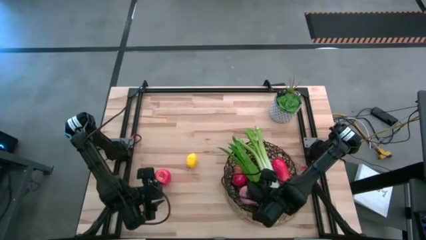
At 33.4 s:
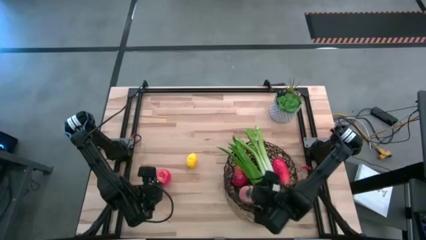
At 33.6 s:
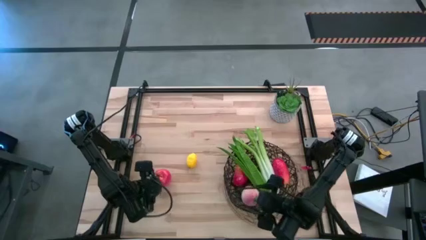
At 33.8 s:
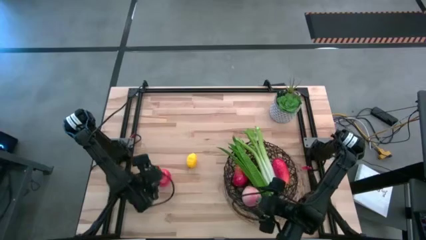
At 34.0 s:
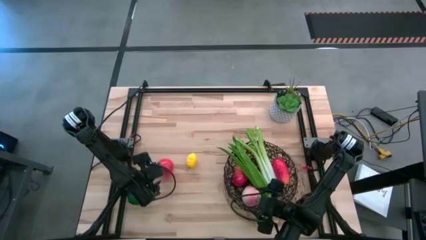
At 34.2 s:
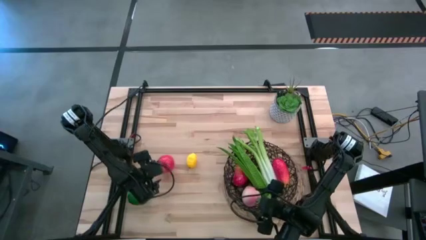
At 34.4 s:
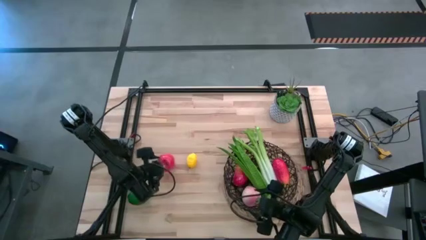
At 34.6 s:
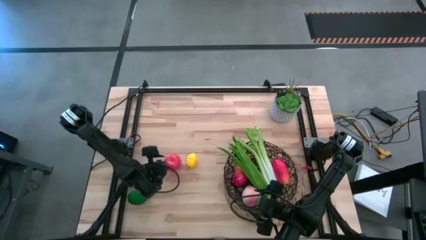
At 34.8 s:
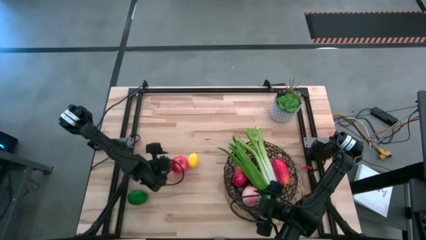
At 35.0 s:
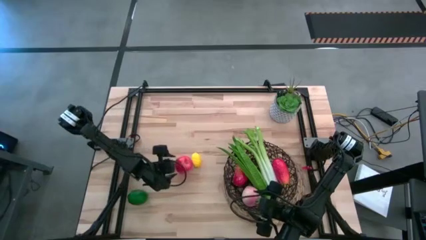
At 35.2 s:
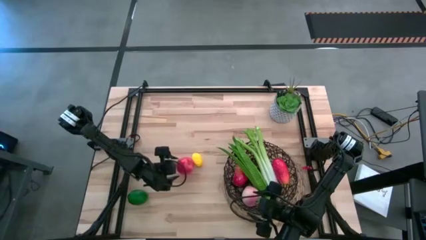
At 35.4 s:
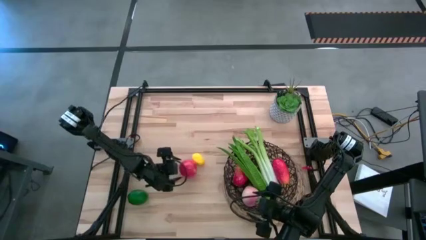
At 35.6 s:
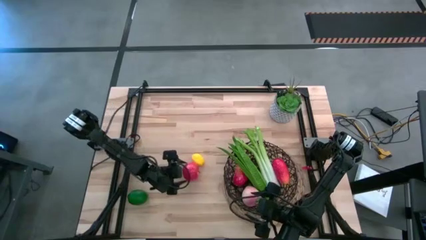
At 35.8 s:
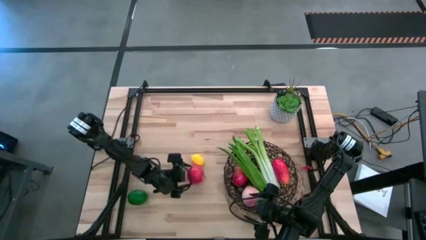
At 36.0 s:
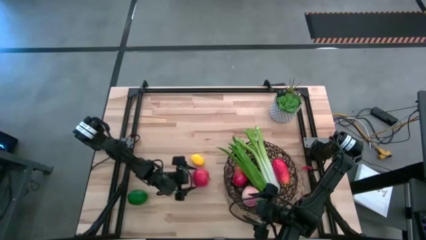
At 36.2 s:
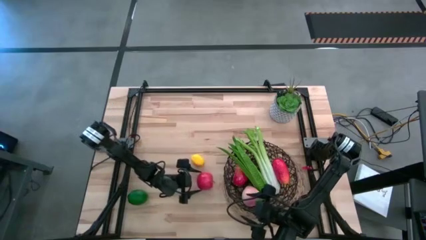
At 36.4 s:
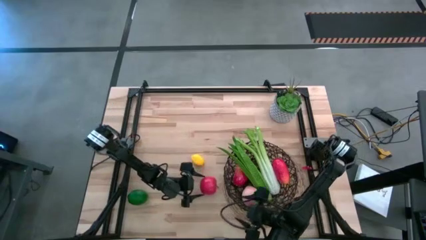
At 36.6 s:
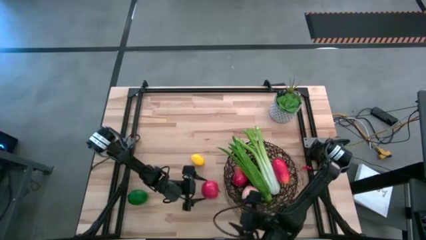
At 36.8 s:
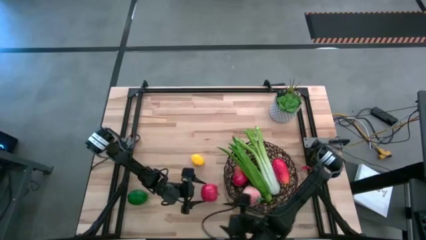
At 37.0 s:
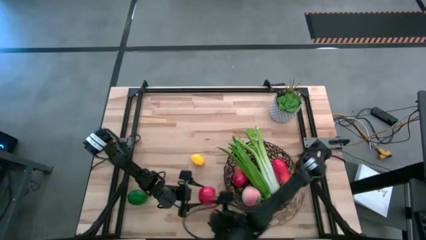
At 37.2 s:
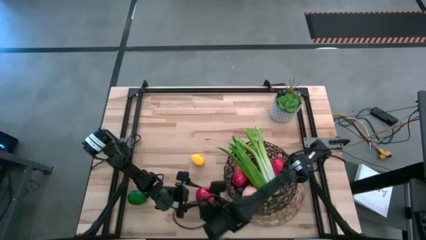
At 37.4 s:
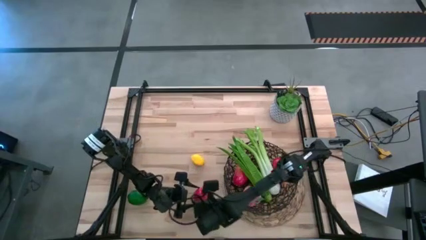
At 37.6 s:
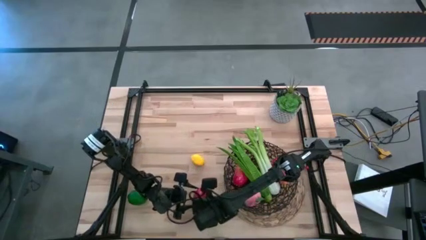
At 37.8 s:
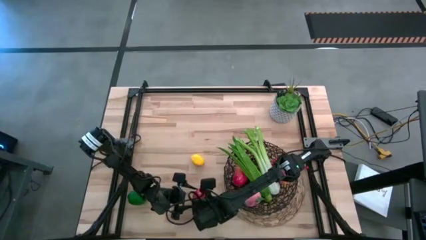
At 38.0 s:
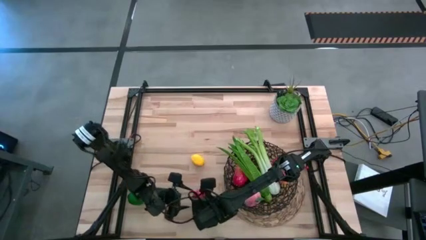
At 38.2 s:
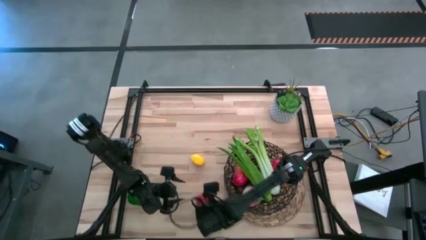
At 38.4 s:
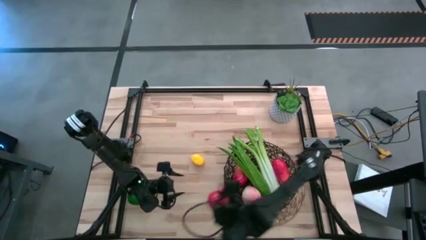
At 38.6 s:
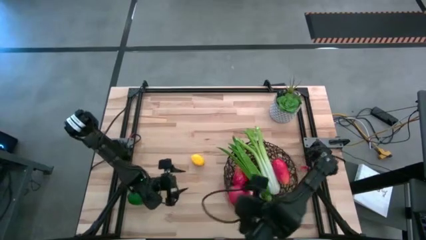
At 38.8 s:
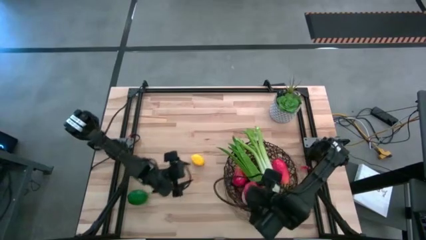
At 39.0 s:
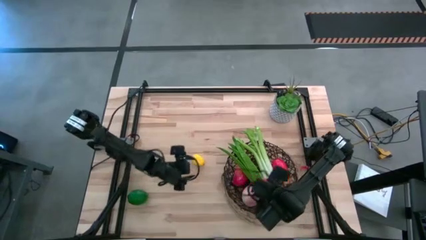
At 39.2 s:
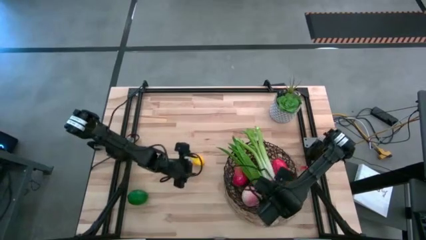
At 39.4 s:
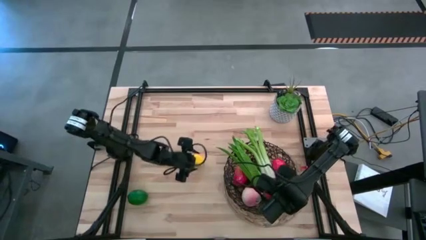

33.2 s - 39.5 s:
Task: Build produce basket
Put the red apple into the wire basket

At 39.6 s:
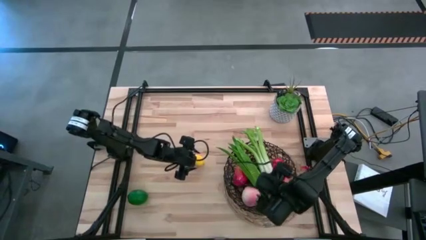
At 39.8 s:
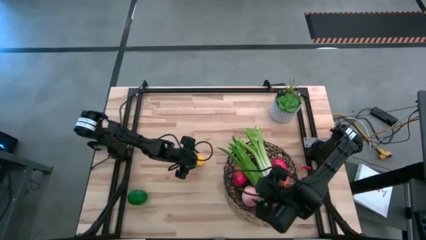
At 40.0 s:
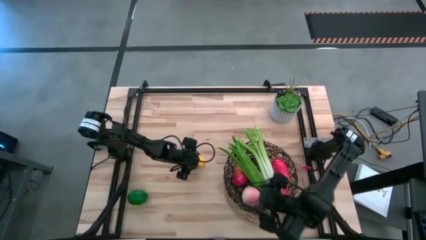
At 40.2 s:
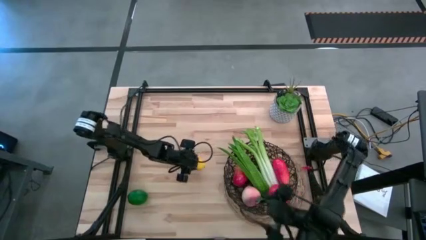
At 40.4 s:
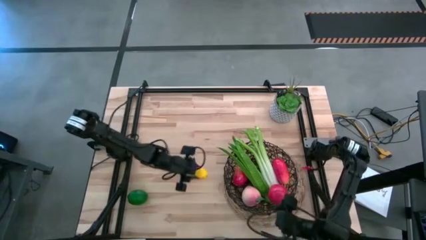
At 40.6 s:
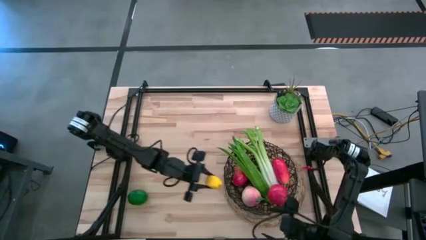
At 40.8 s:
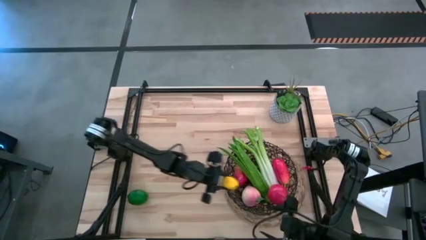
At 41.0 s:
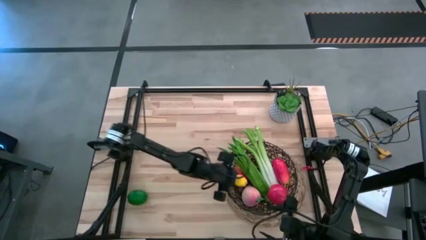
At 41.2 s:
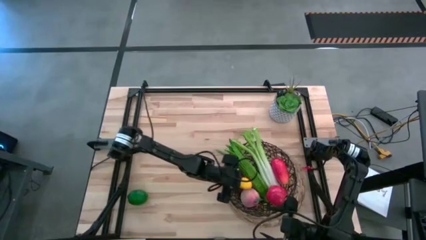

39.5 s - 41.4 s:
Put the lemon into the wire basket

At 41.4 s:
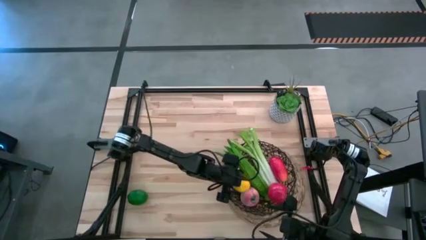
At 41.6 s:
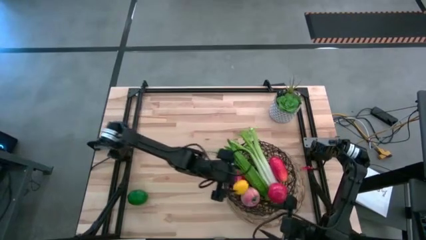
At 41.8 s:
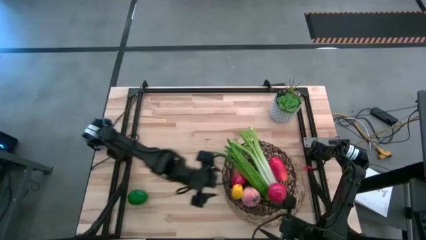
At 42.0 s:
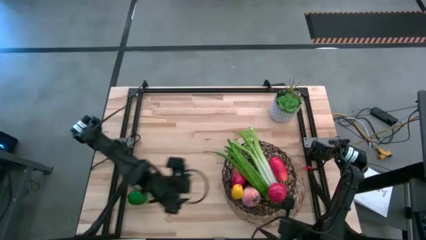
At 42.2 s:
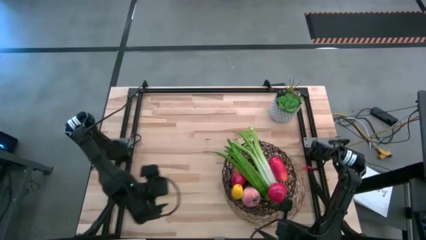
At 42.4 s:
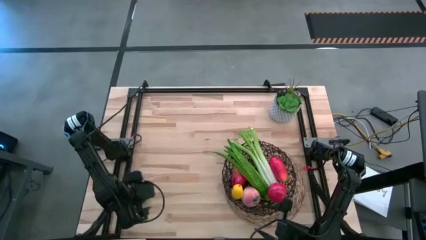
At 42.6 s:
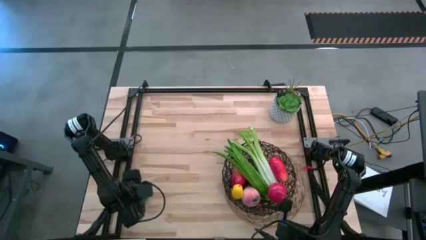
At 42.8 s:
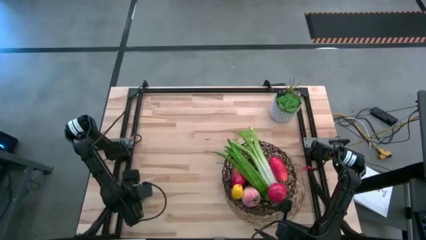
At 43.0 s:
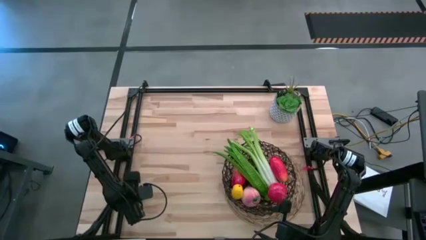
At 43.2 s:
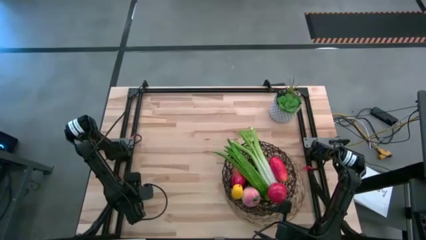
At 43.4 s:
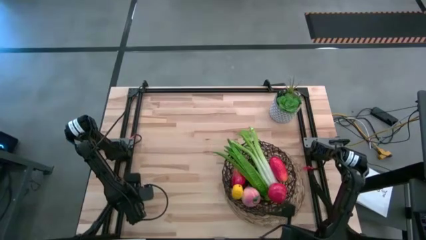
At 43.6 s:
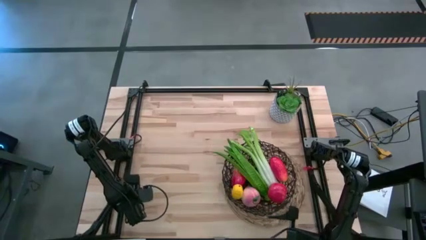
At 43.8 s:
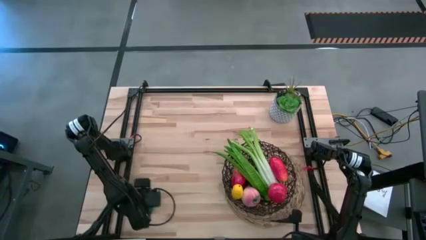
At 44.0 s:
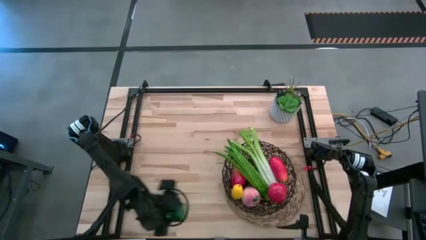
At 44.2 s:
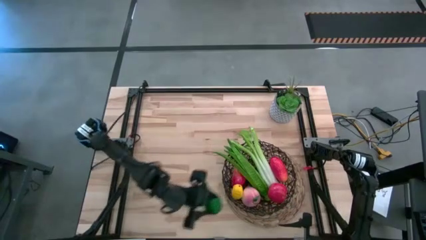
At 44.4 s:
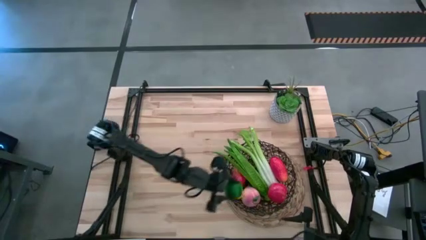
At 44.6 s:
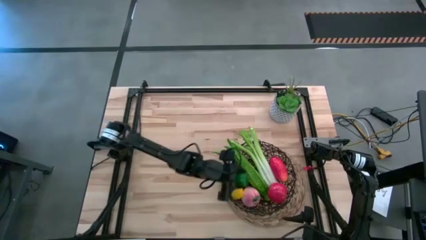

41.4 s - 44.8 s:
Put the lime into the wire basket

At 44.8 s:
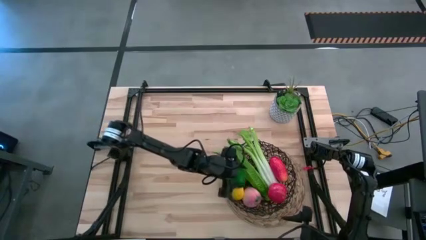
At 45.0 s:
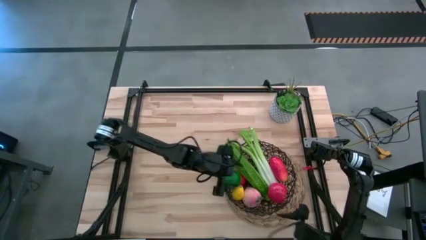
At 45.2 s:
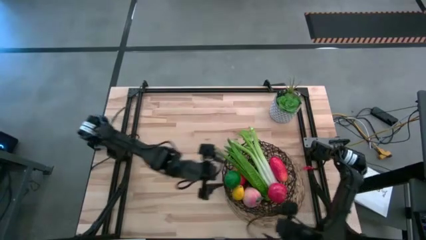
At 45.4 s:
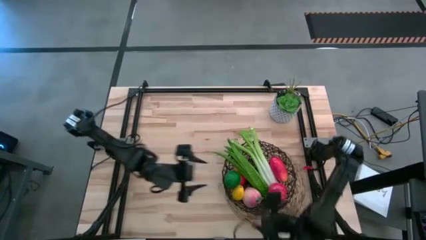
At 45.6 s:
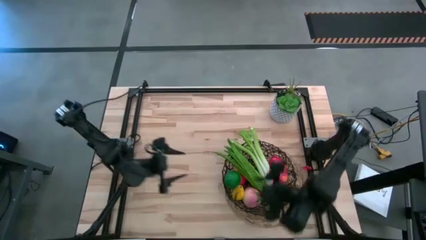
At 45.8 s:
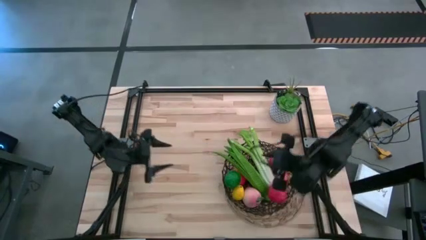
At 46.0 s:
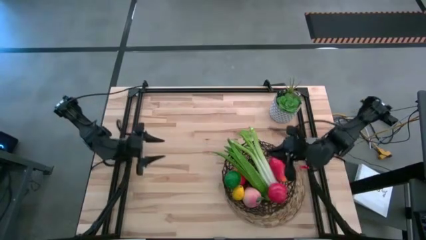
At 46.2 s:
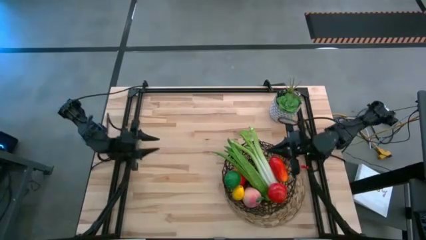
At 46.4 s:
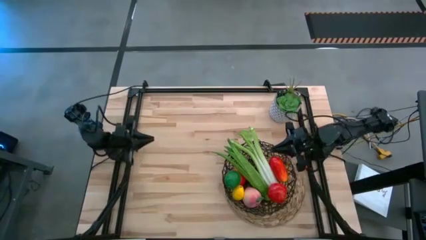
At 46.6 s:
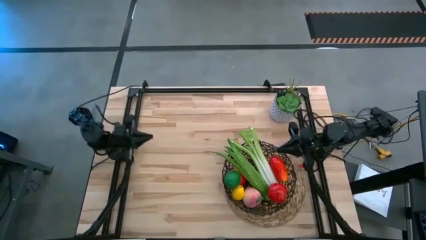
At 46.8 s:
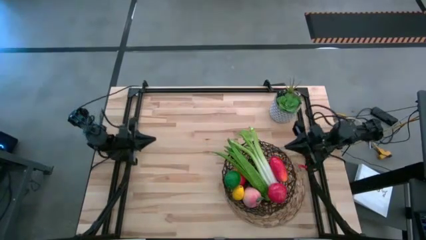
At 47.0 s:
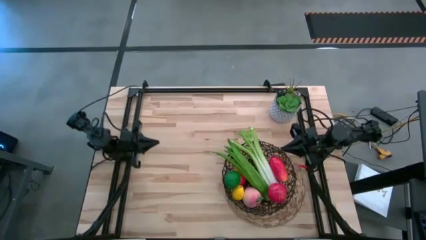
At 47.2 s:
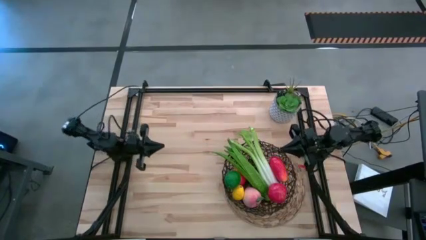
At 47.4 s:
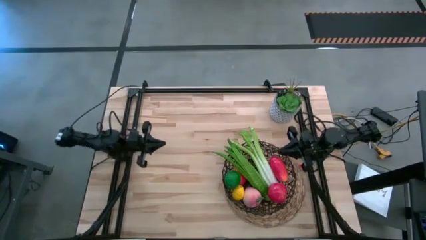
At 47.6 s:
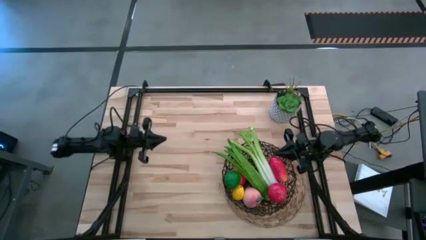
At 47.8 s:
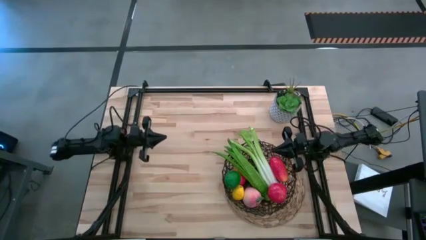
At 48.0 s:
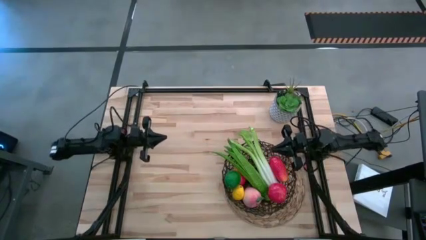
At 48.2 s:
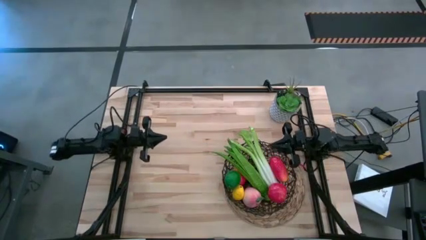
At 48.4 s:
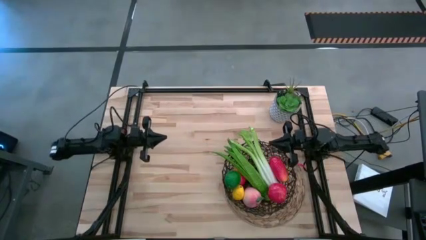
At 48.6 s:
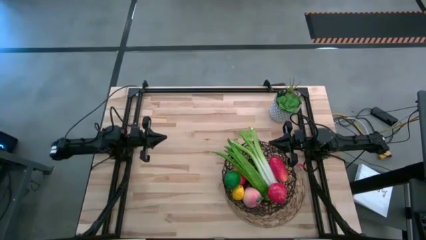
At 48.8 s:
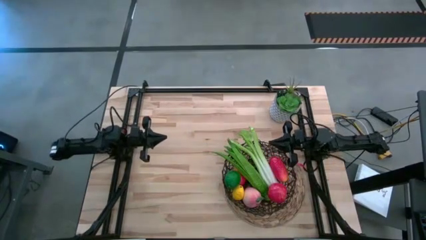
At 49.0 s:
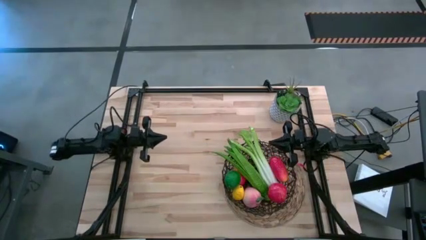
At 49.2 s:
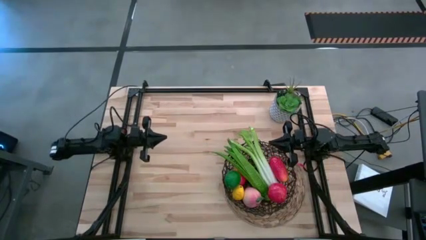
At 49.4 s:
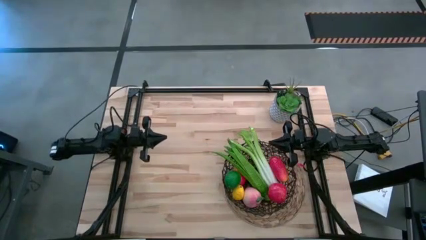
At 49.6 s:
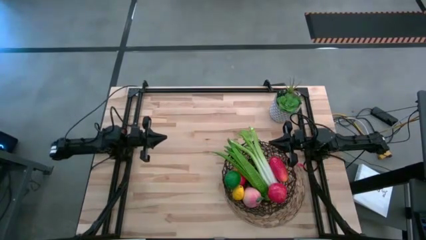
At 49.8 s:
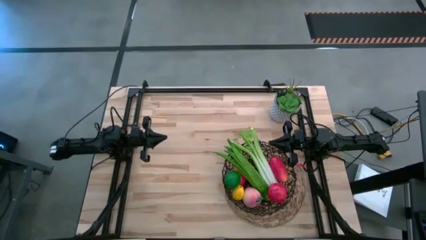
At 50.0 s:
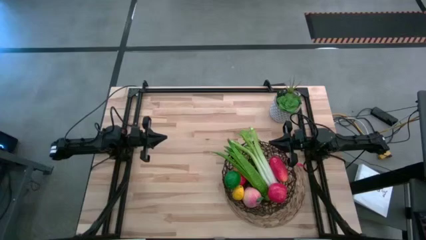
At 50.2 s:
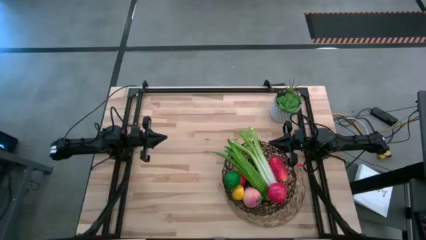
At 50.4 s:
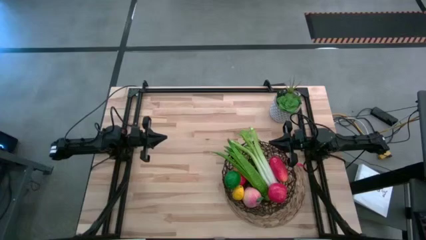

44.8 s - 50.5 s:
Return to Home Position
